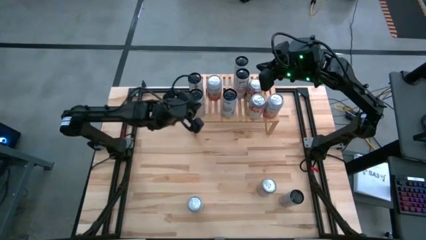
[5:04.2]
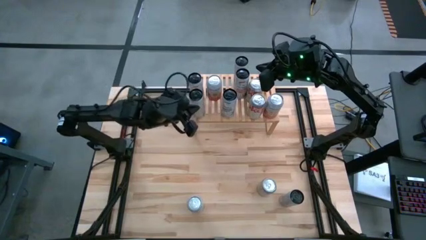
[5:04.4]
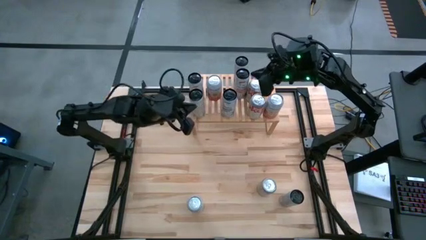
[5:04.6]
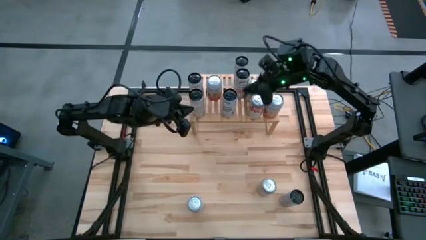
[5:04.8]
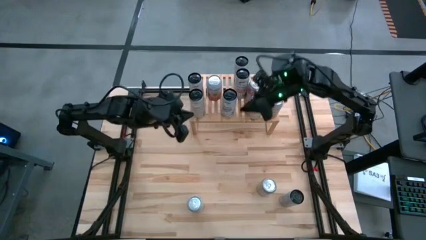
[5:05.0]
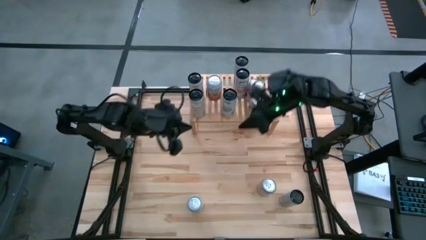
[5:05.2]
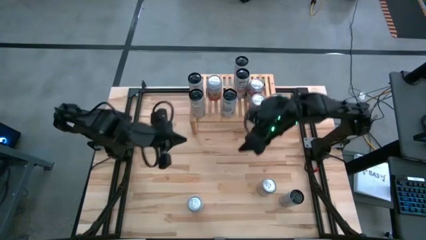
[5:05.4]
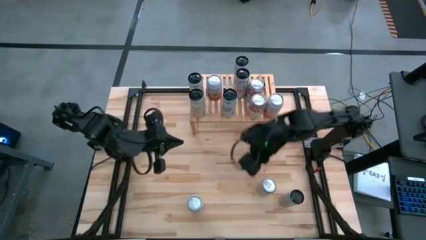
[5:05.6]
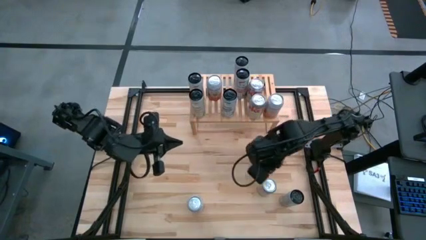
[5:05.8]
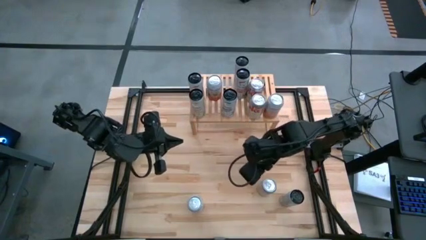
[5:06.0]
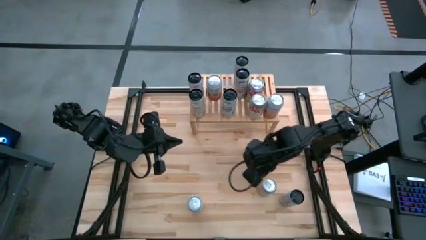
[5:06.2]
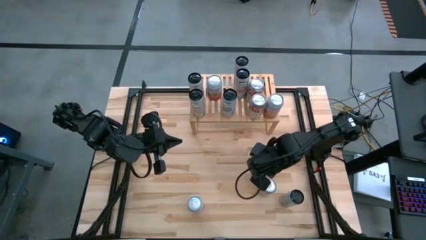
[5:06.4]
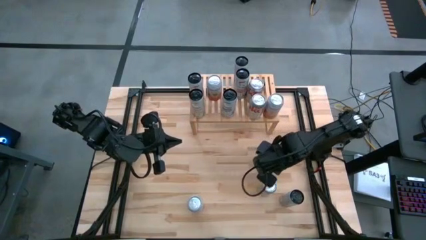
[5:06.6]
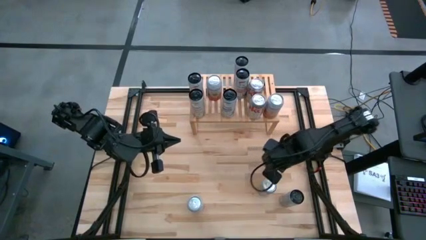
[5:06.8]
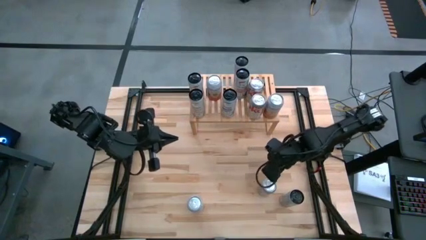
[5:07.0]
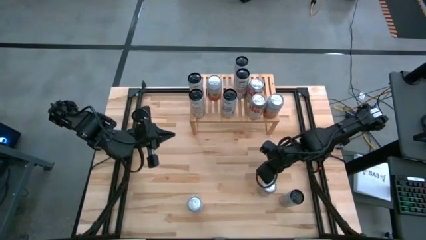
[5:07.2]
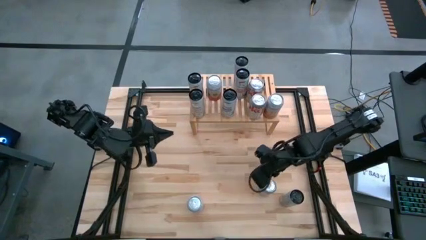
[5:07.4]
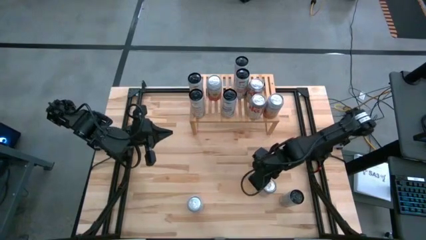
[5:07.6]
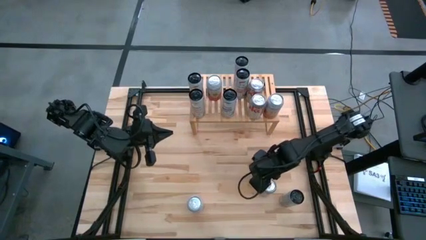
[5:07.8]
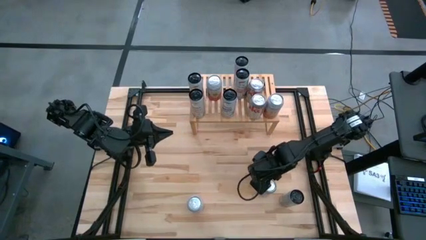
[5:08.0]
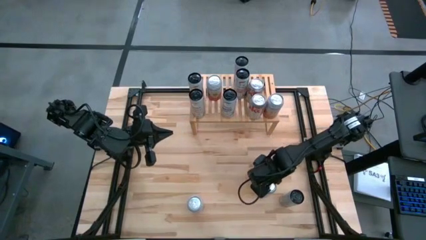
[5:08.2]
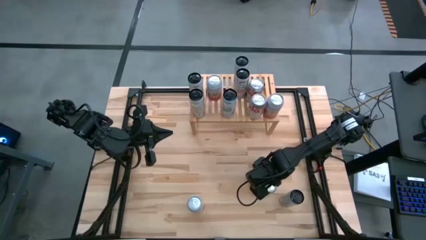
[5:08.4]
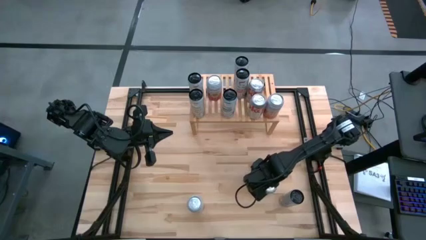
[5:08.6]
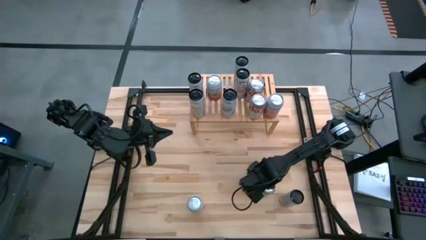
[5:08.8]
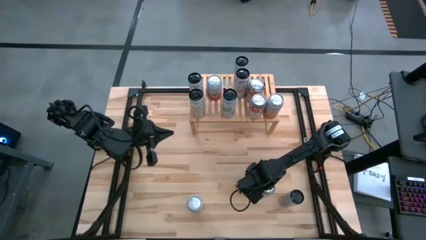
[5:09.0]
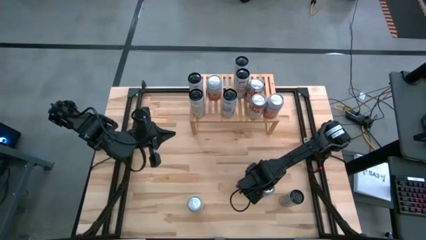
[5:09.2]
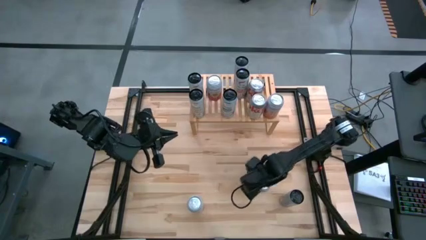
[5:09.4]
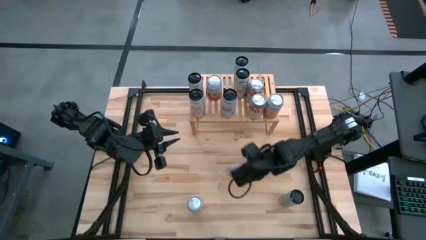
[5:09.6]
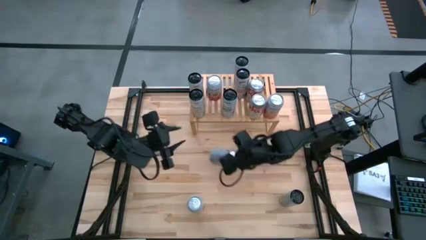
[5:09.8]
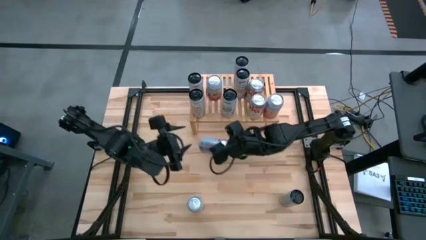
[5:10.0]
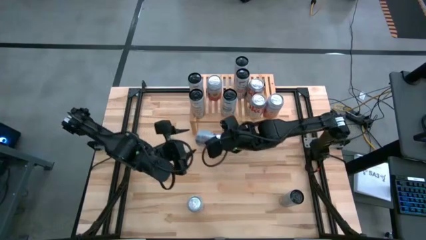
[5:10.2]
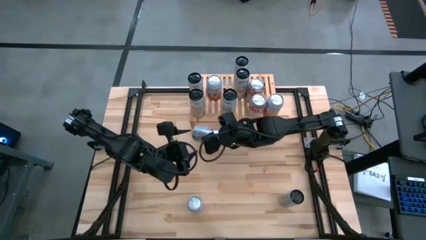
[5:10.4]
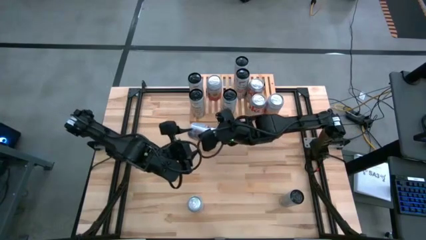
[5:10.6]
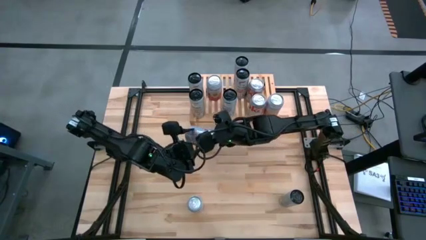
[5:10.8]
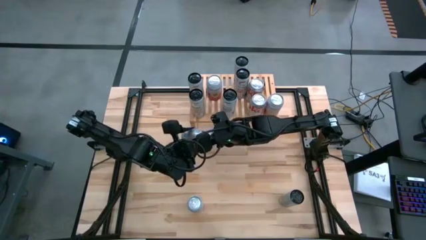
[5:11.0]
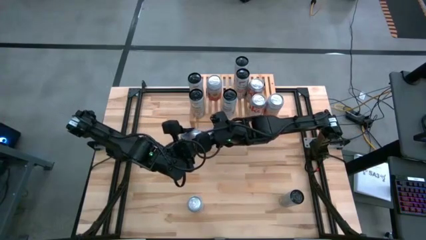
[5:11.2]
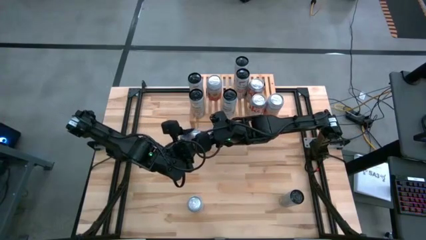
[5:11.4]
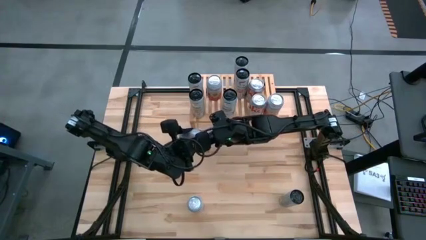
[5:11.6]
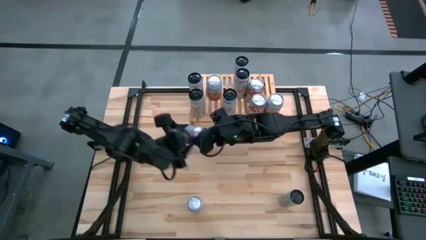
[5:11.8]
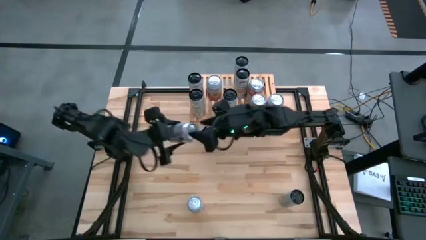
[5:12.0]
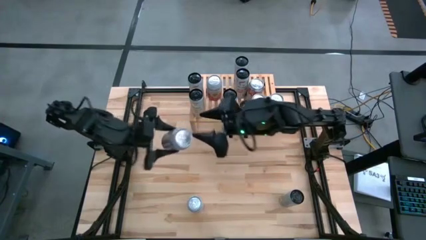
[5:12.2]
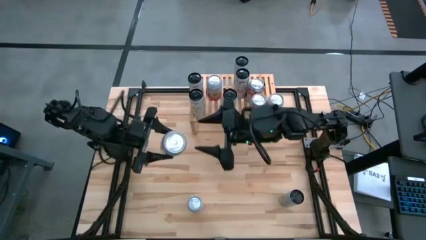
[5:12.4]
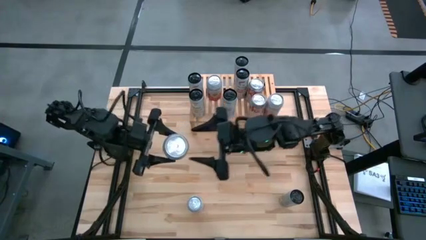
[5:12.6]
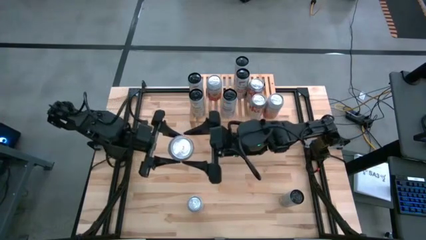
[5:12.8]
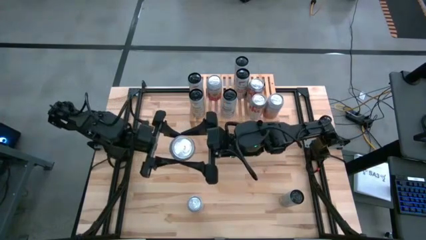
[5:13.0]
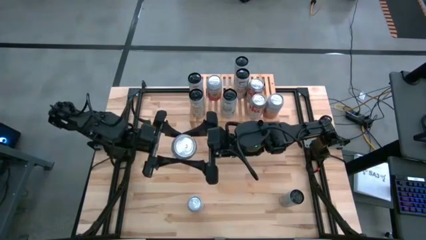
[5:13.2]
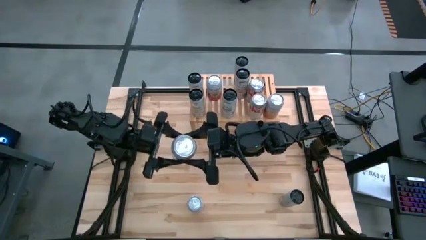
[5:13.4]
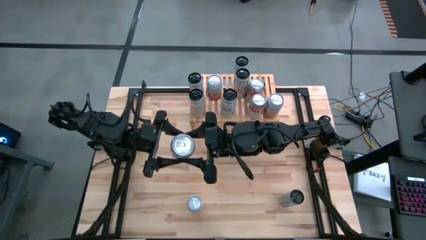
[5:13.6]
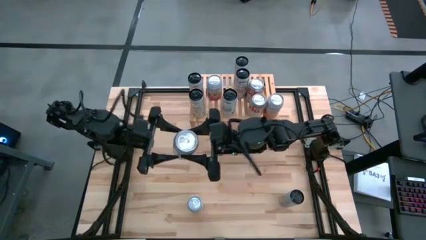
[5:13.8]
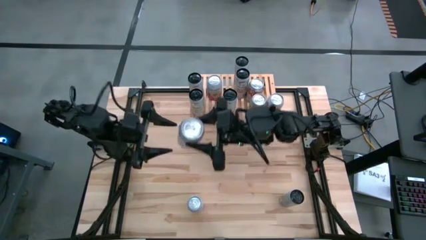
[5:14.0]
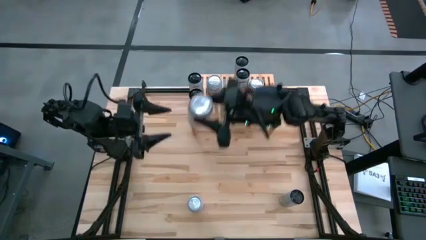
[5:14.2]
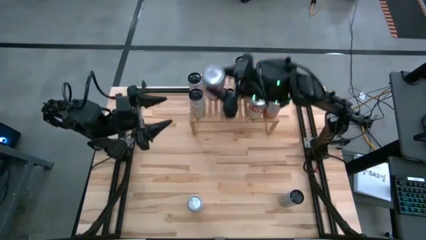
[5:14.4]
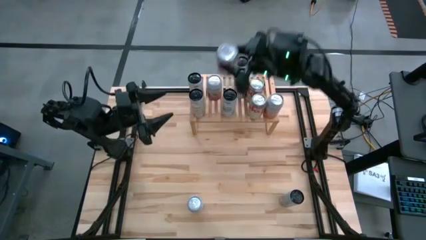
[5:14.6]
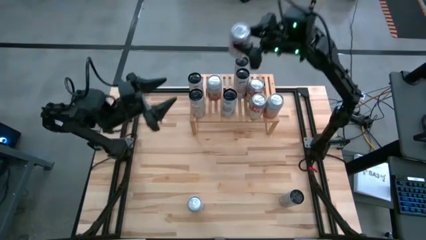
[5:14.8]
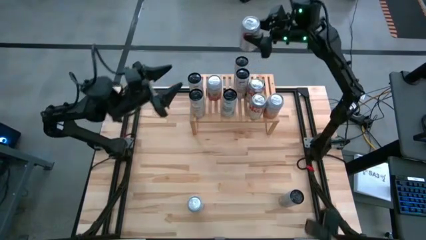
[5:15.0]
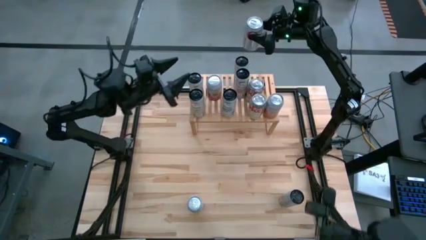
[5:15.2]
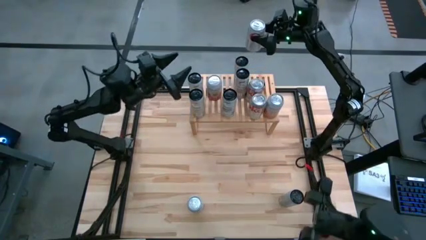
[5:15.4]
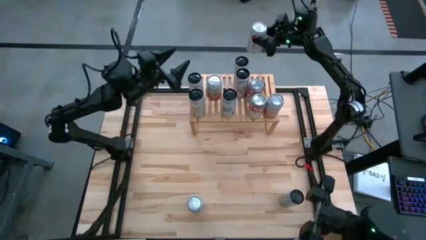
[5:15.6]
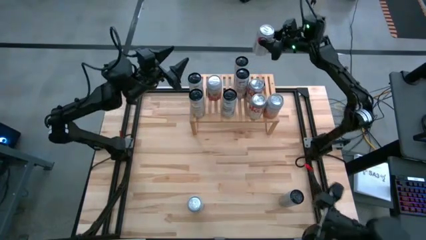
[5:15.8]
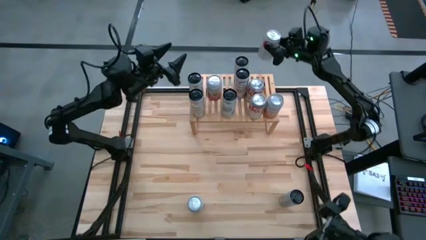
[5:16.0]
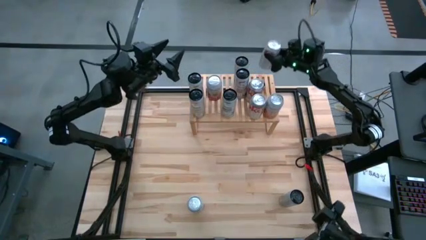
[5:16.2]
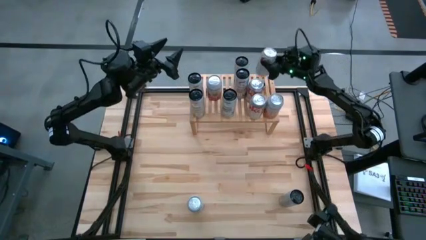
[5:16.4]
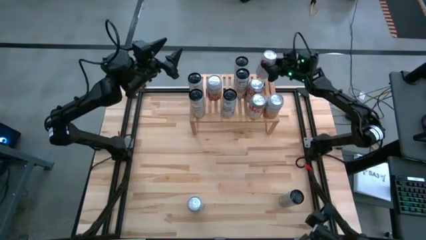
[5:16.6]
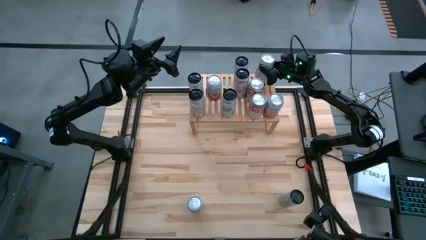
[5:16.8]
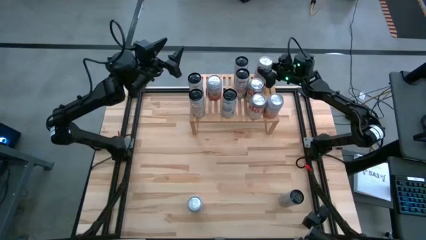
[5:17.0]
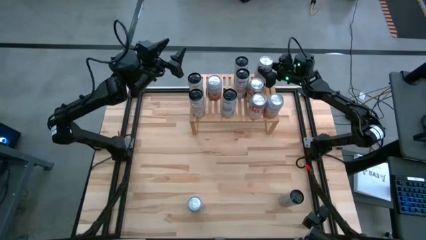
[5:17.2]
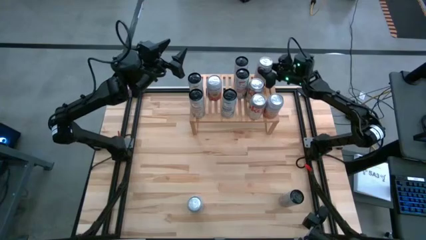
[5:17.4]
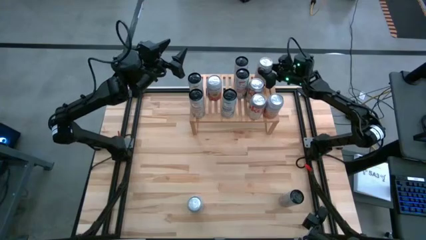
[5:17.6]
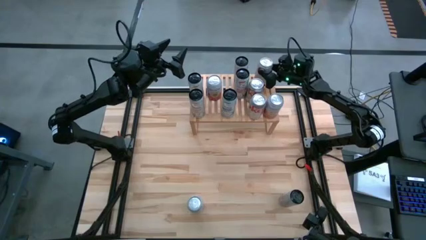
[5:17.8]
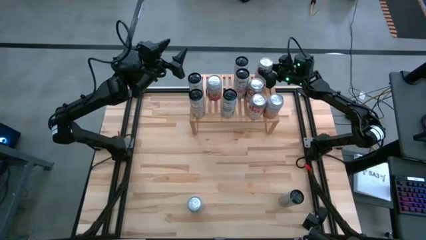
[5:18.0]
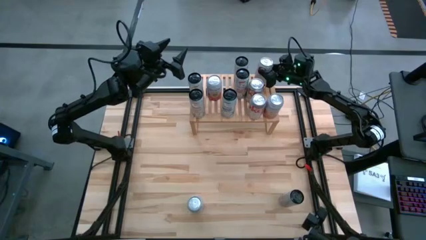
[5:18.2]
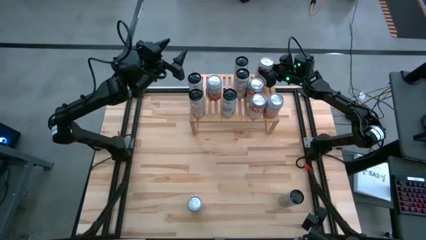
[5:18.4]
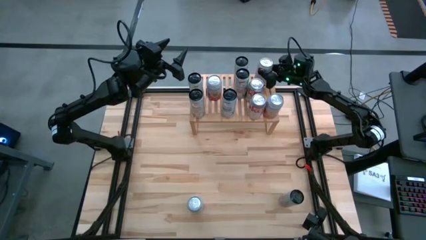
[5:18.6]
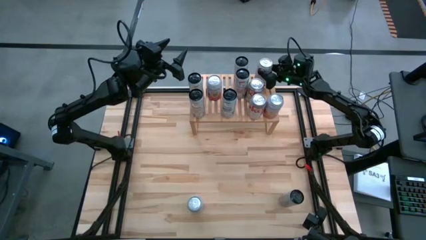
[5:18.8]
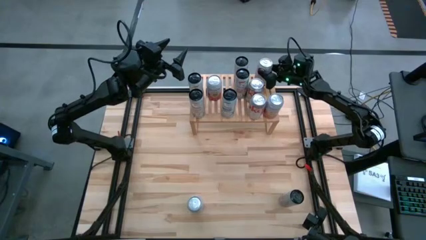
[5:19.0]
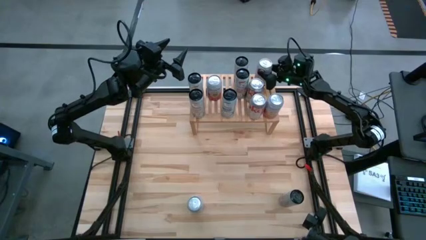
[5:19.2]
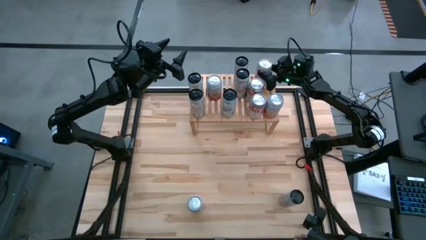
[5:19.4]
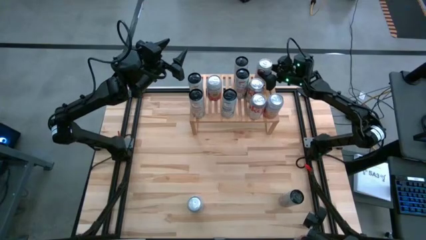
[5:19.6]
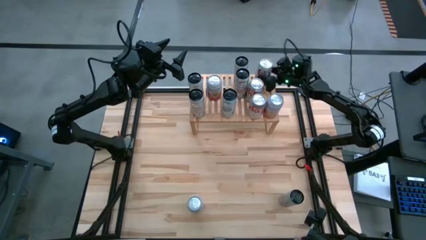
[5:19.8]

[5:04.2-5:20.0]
Task: Place canned beverage on shelf
Put the silver soda can on the shelf aligned with the other silver soda cans

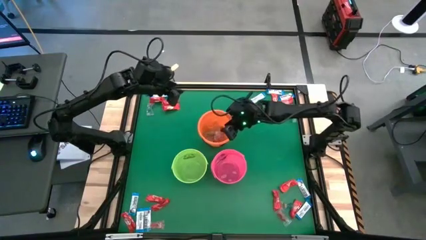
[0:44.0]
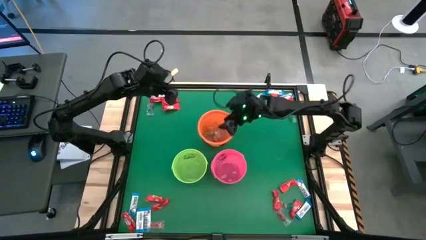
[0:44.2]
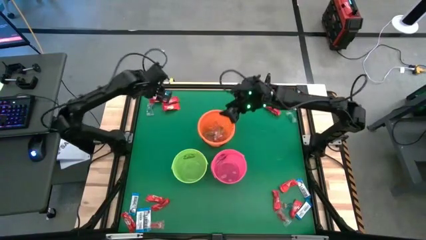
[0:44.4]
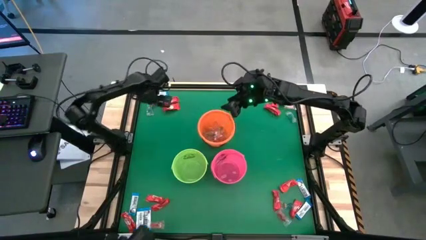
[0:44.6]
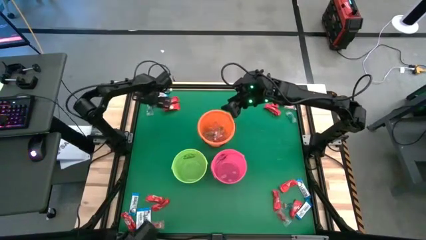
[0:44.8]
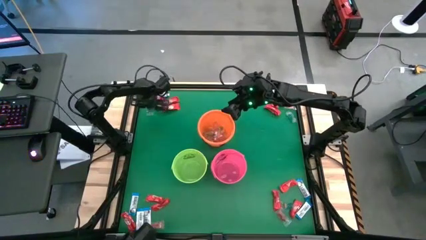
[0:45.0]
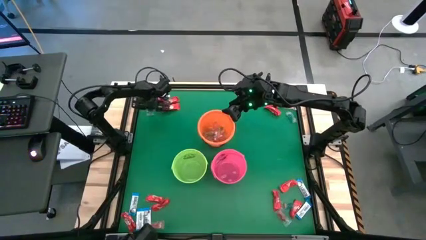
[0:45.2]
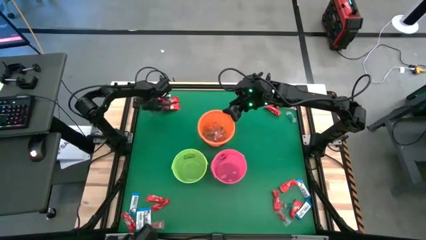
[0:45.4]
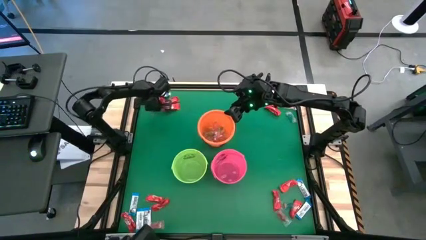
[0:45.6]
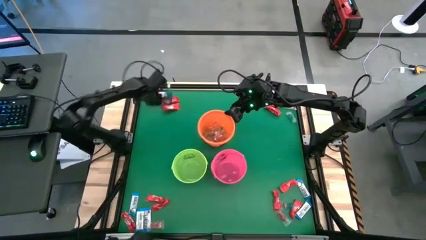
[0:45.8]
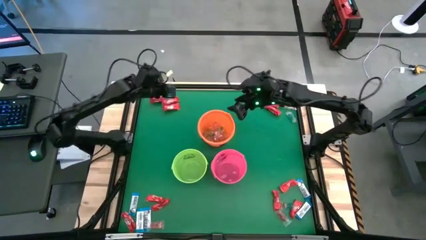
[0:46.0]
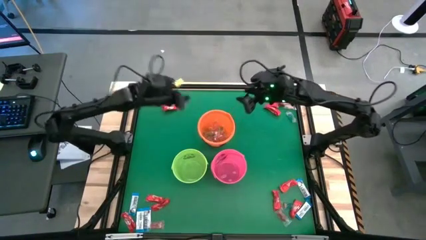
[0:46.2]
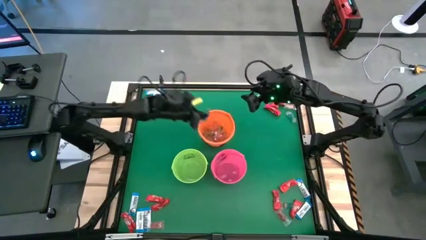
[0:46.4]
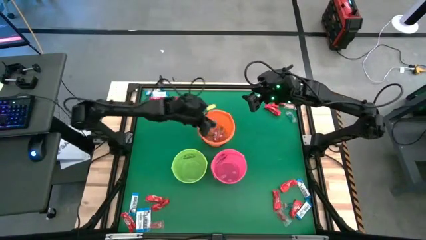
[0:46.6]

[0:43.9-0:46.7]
Task: Sort candy by brand, put in halloween buckets
Put the blue gummy into the orange bucket
